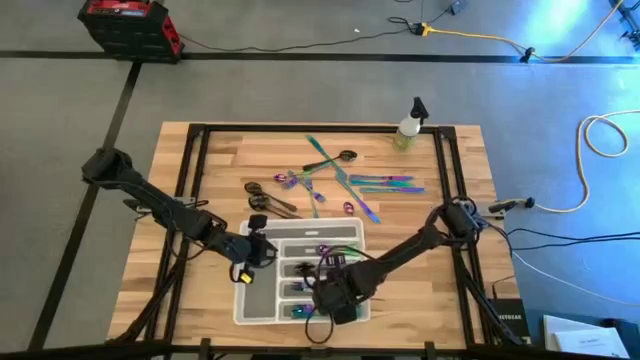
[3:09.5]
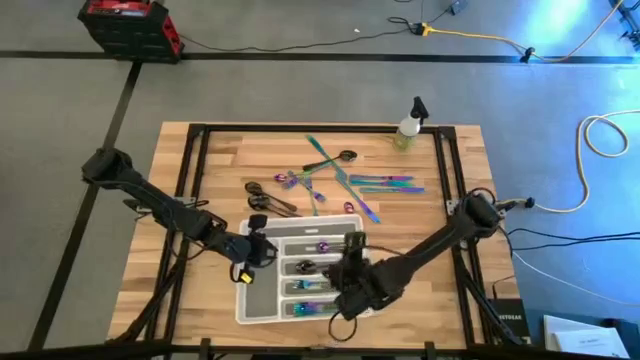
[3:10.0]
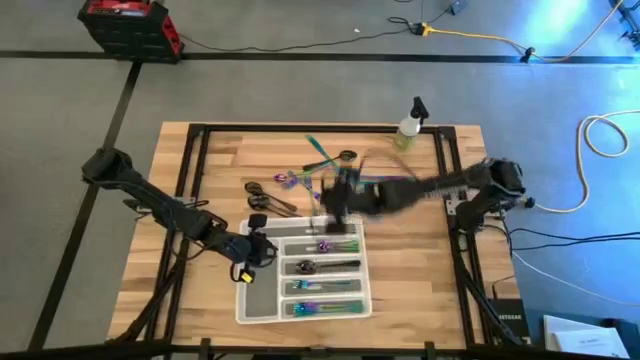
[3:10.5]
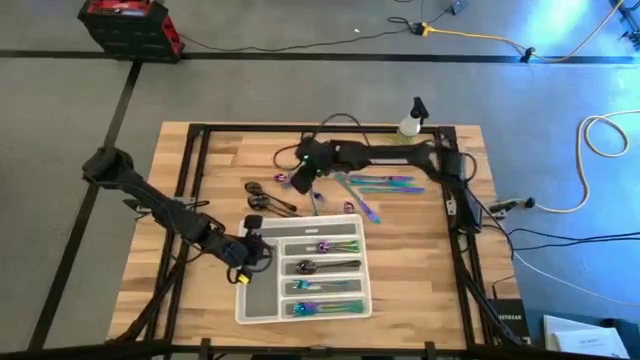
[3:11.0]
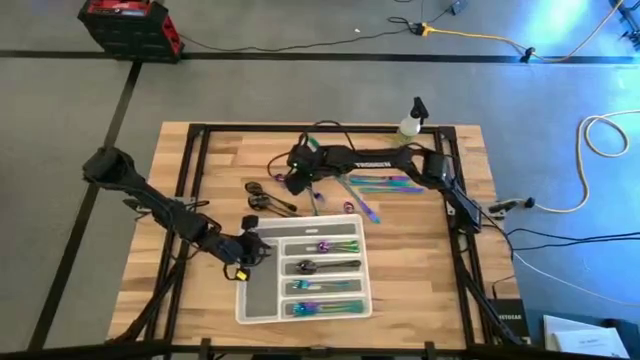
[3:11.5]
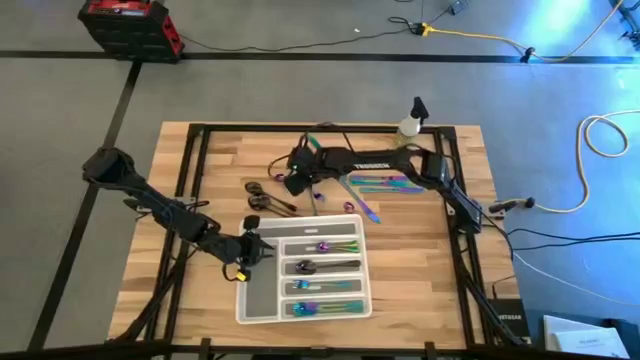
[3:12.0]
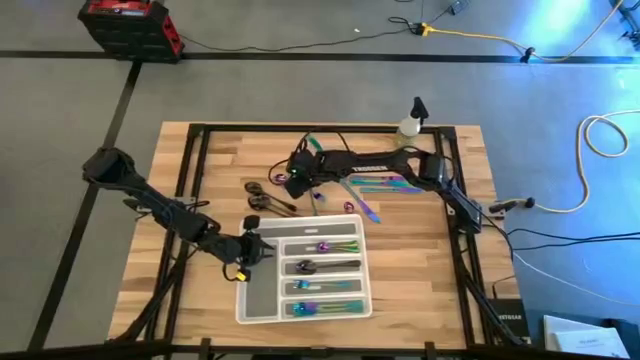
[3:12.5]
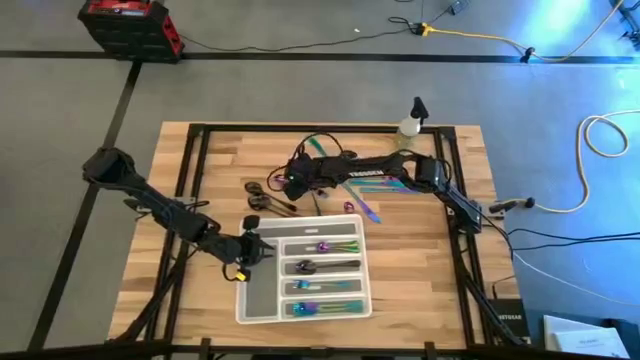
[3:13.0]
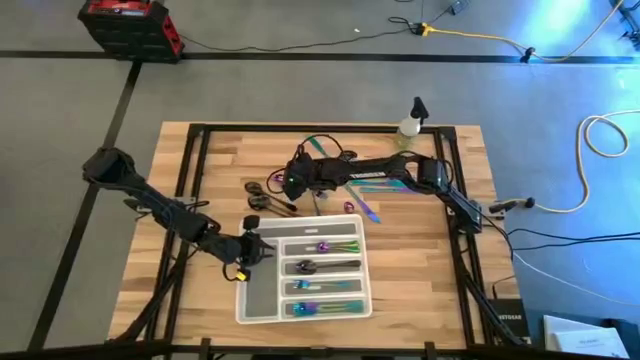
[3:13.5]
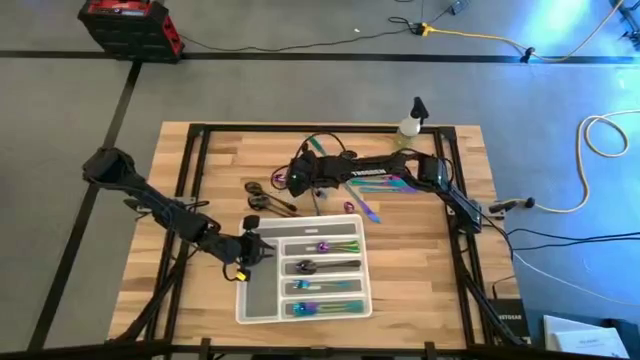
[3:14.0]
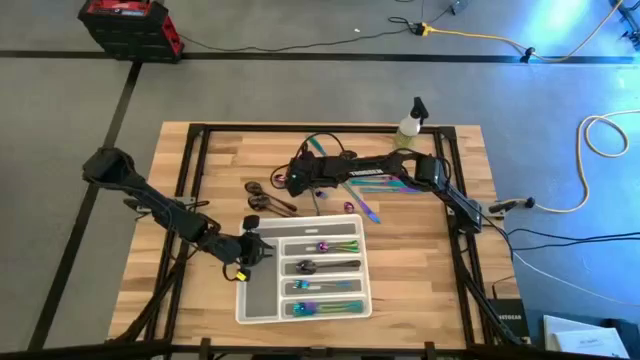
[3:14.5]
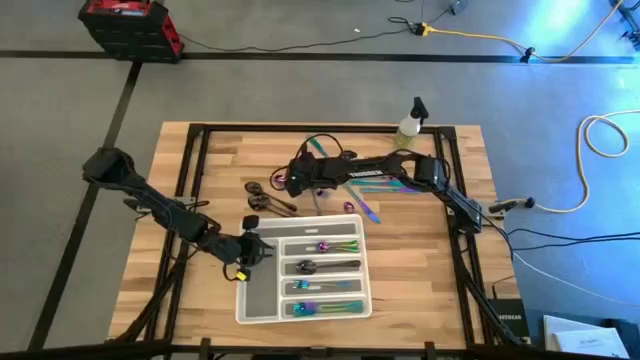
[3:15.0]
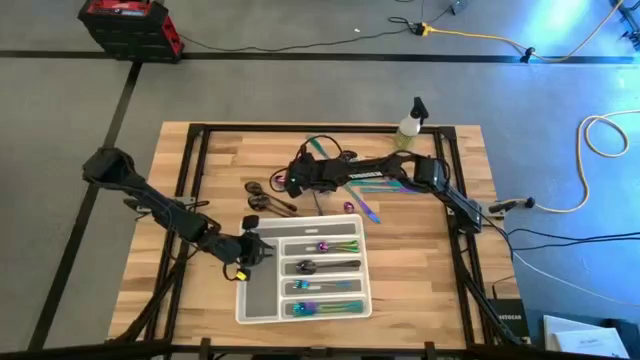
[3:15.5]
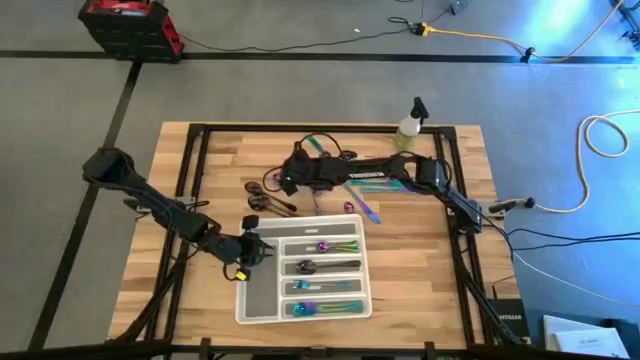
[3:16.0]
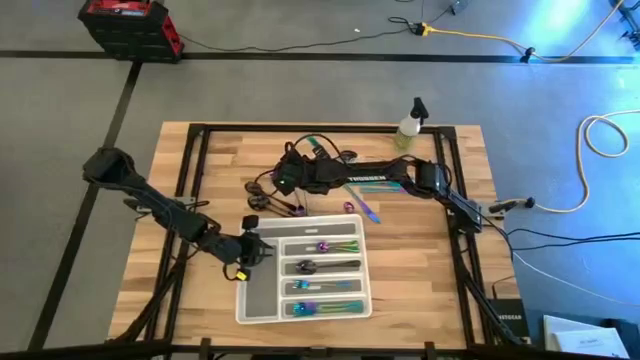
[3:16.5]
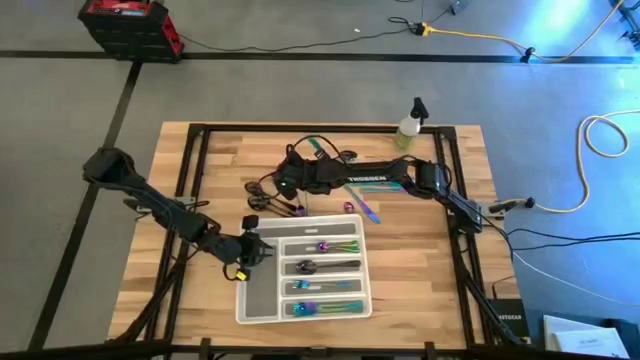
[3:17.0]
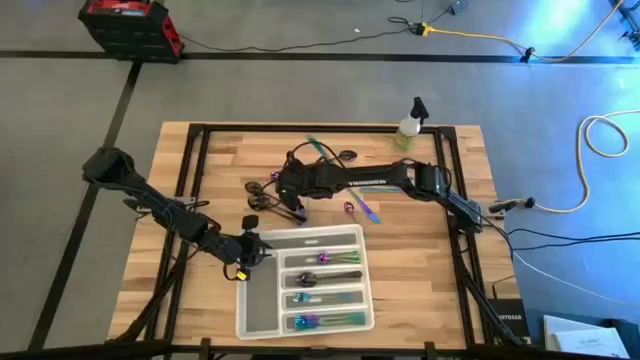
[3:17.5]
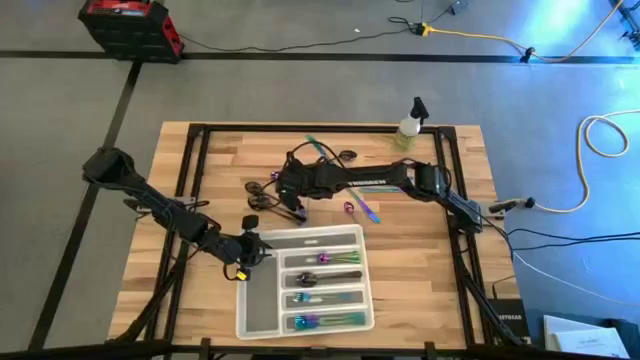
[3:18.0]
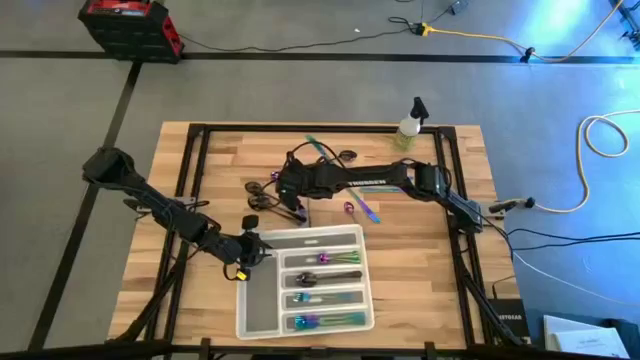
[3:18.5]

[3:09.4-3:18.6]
Task: Sort silverware
Put the blue fork into the white silverware tray

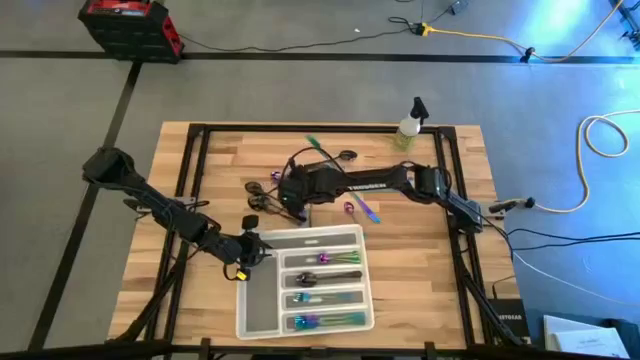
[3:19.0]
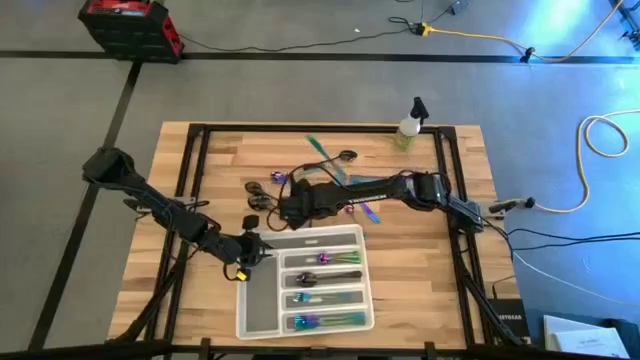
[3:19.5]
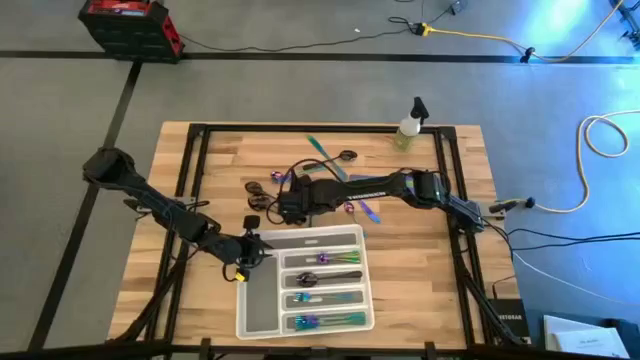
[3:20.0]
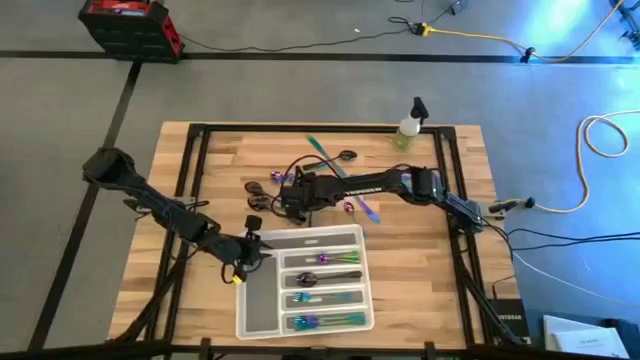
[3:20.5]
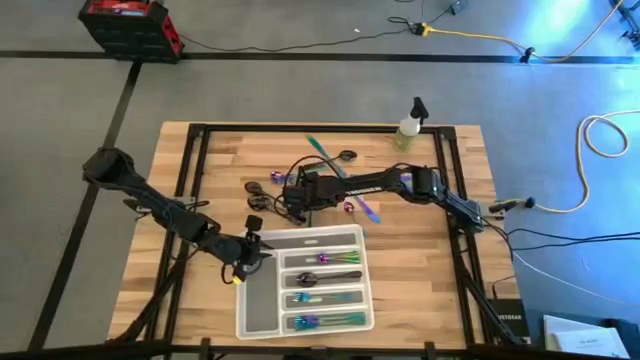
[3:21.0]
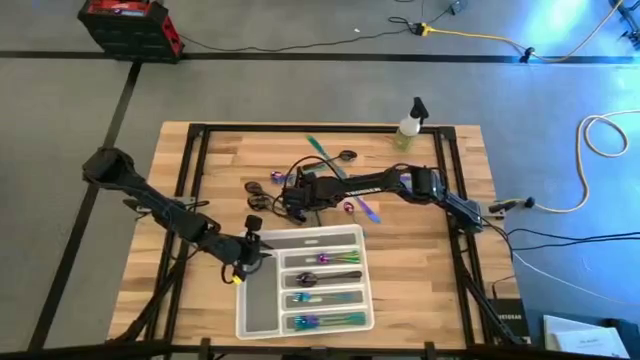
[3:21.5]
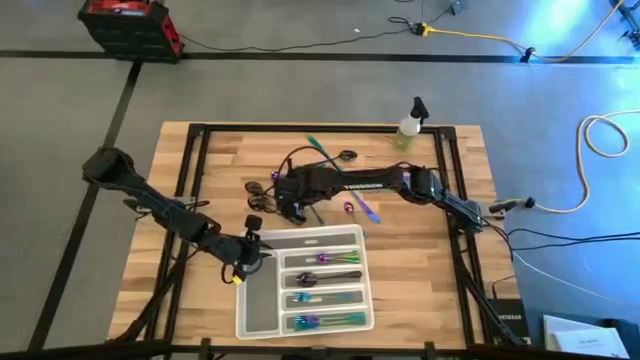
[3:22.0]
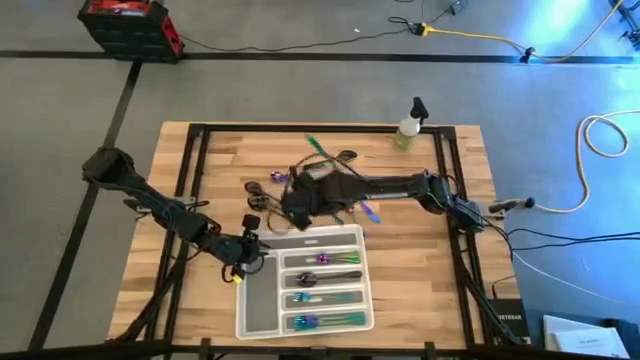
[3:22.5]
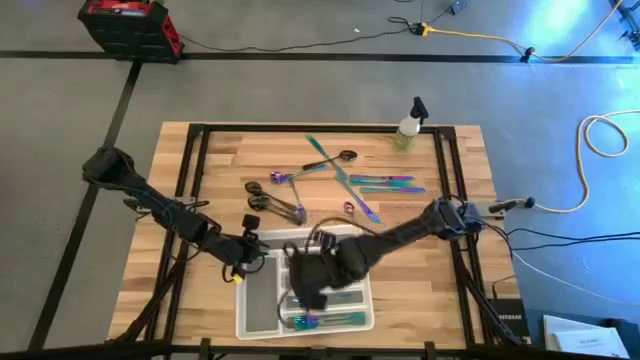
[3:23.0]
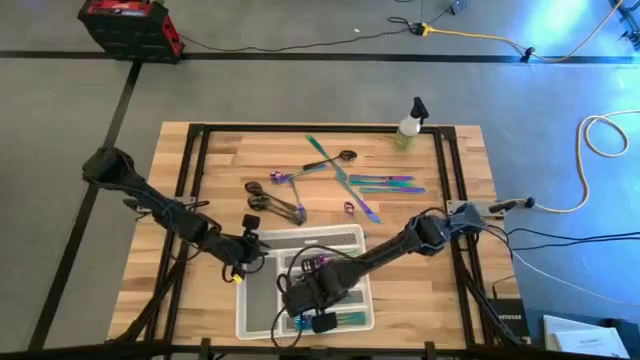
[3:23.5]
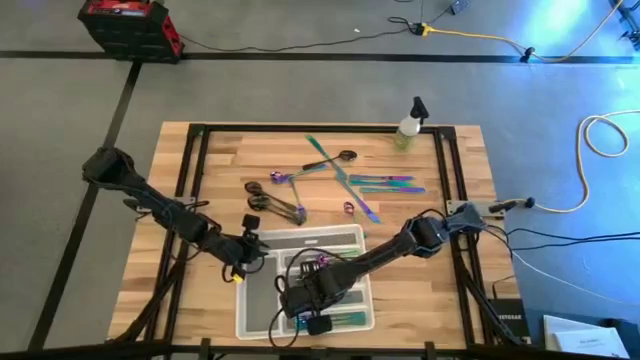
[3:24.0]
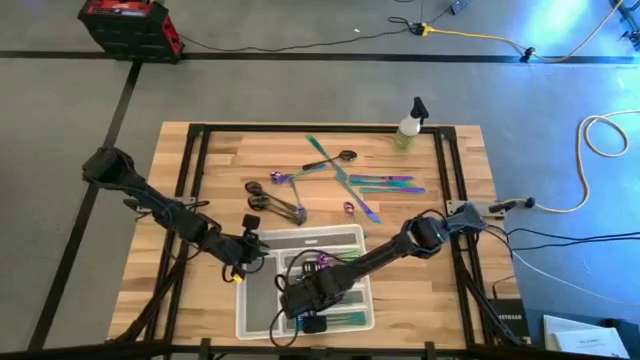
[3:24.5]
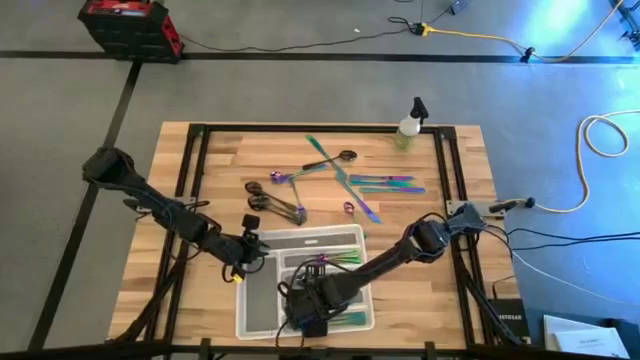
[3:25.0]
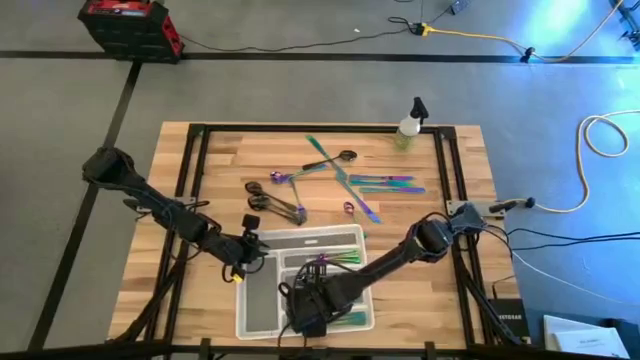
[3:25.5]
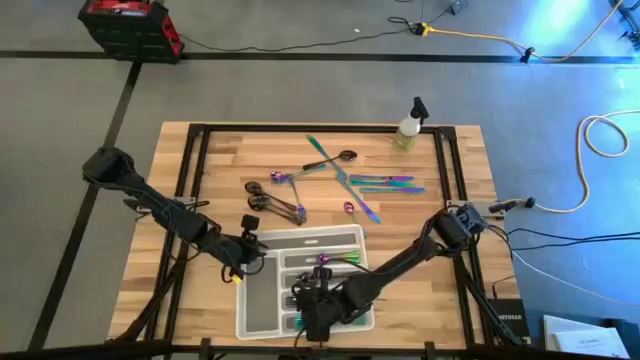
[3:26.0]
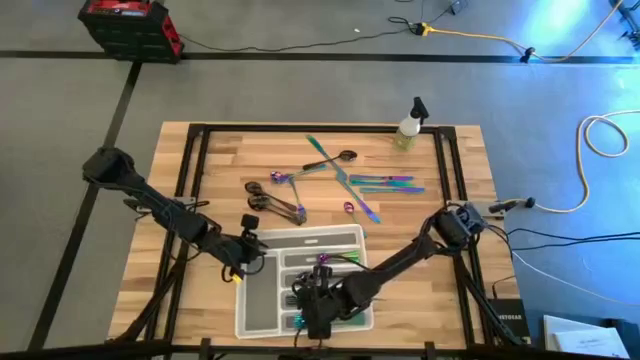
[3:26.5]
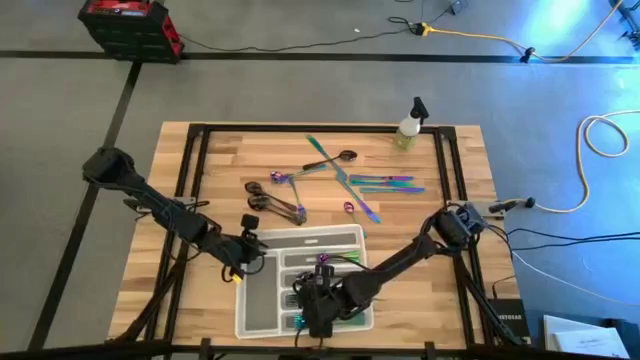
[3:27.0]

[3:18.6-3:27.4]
Put the blue fork into the white silverware tray

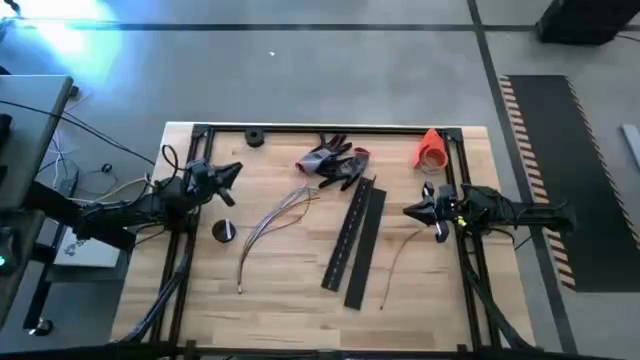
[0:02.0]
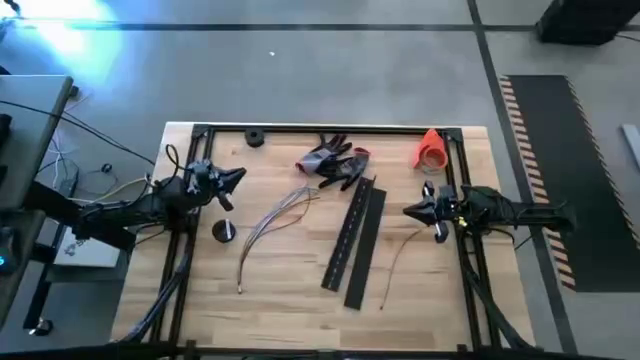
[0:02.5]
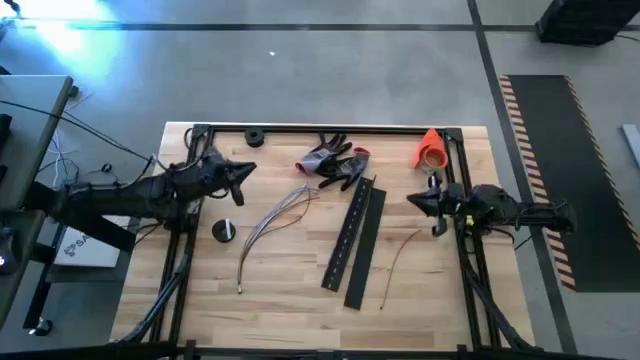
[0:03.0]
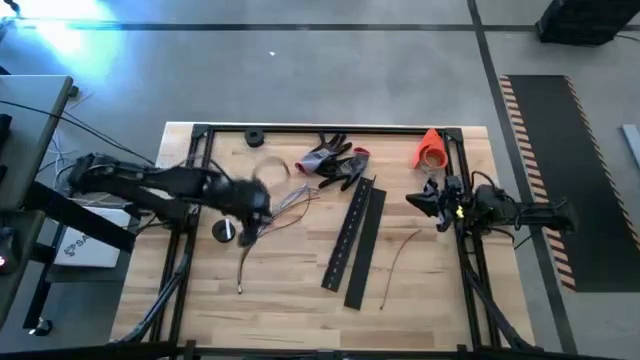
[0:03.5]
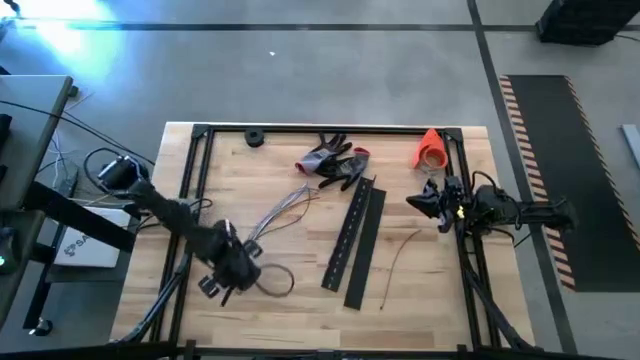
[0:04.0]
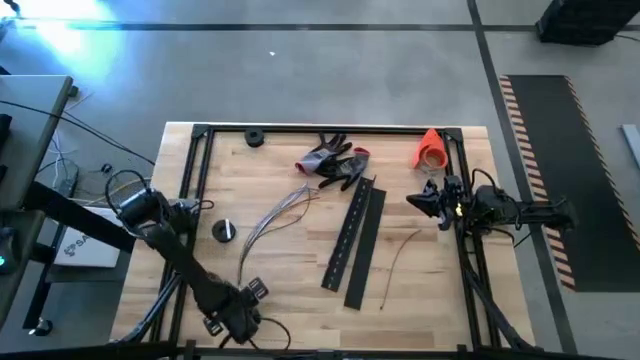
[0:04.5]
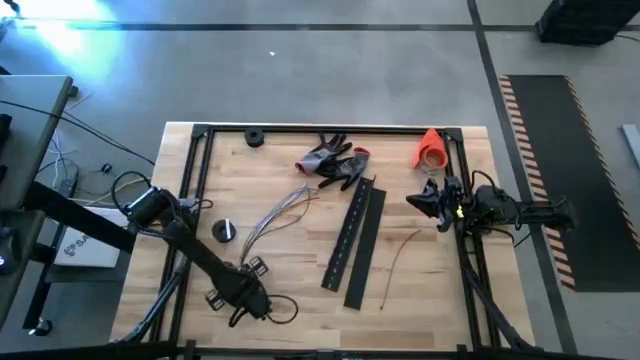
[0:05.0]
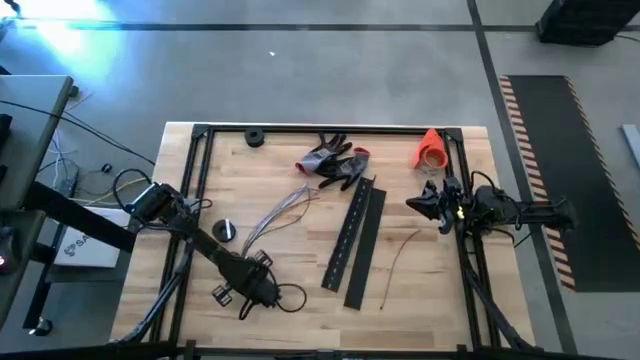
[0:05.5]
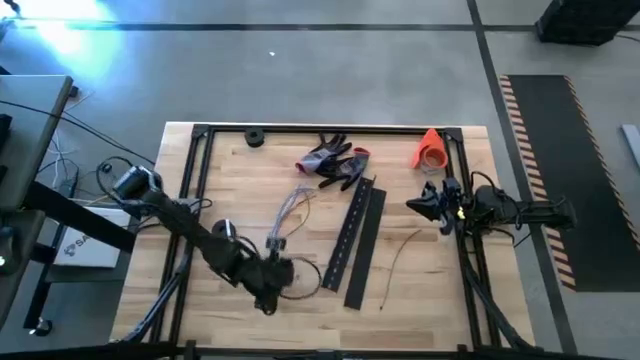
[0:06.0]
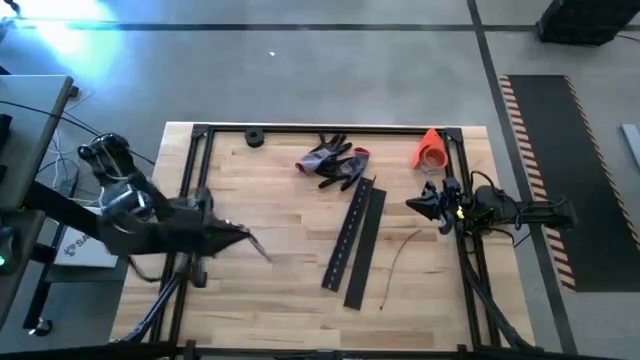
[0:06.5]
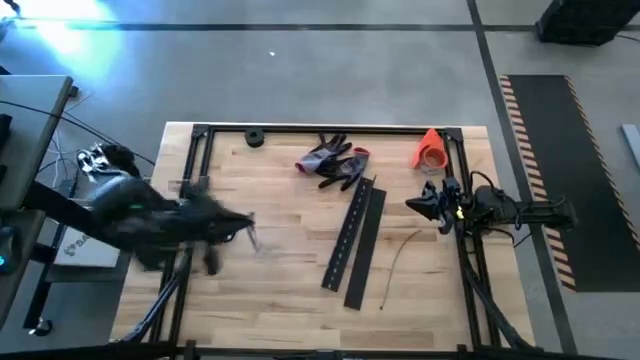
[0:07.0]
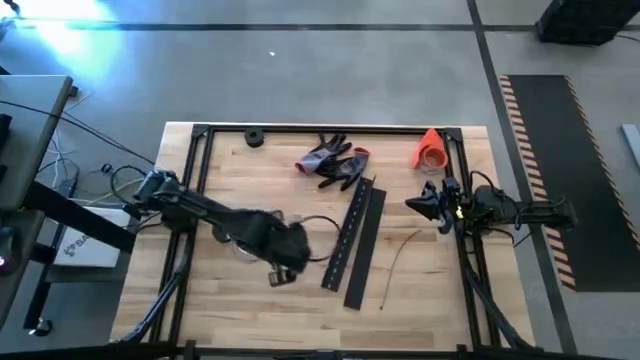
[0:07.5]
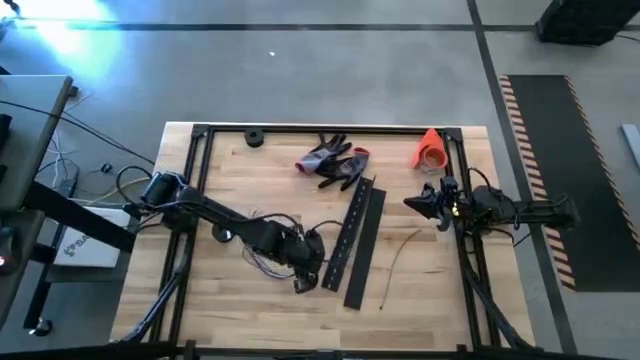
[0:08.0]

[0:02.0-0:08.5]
Task: Ziptie cables
Move the cables to the center of the table
